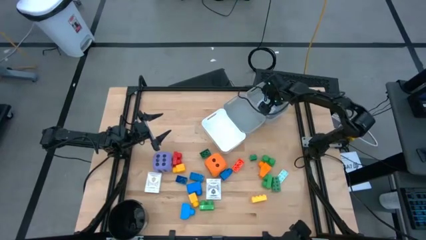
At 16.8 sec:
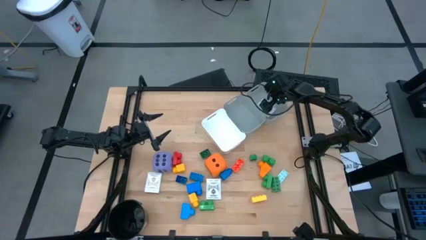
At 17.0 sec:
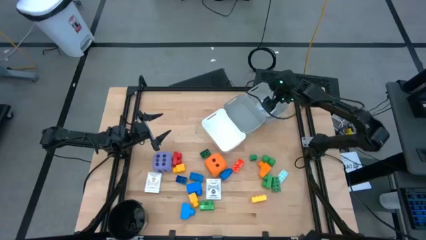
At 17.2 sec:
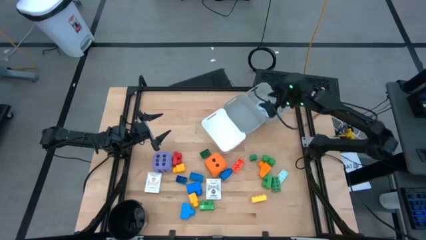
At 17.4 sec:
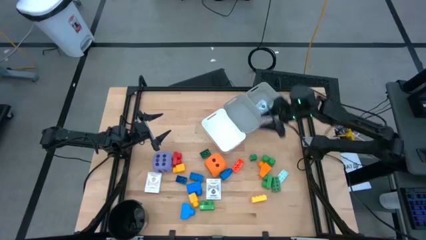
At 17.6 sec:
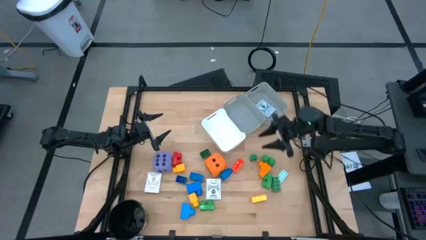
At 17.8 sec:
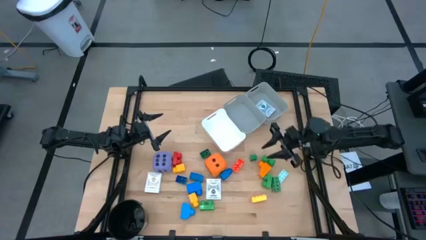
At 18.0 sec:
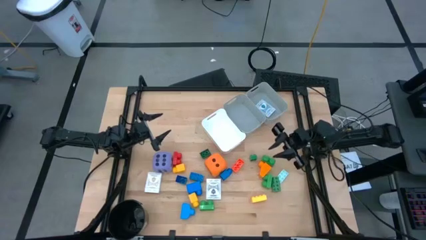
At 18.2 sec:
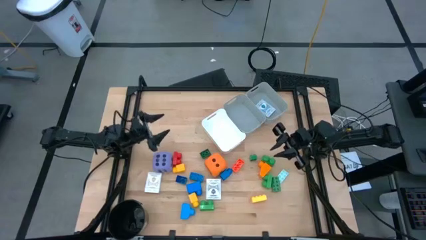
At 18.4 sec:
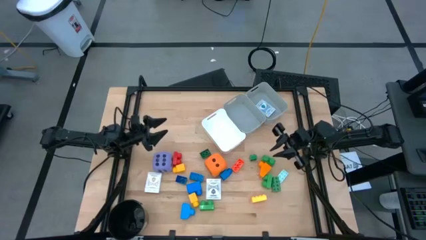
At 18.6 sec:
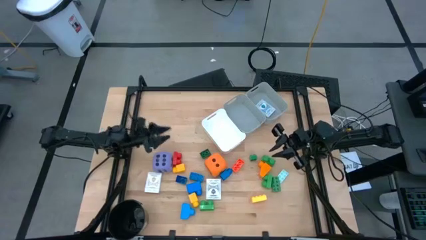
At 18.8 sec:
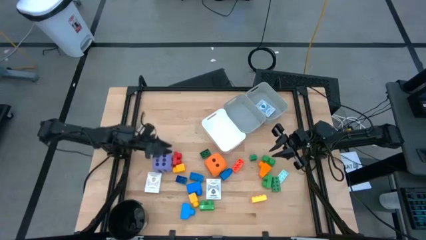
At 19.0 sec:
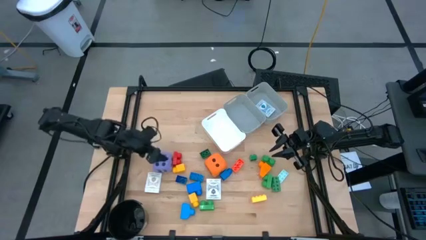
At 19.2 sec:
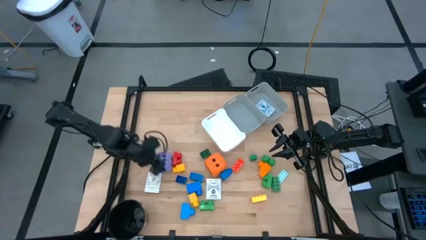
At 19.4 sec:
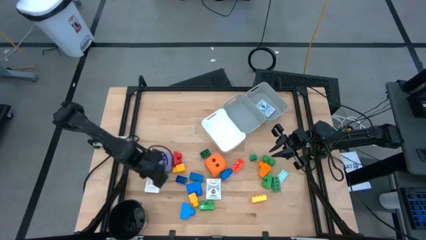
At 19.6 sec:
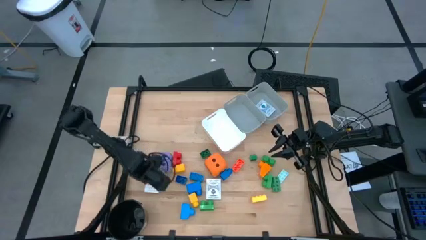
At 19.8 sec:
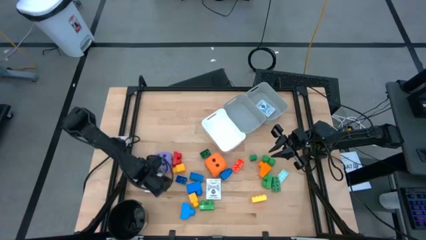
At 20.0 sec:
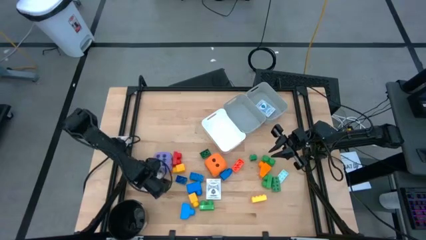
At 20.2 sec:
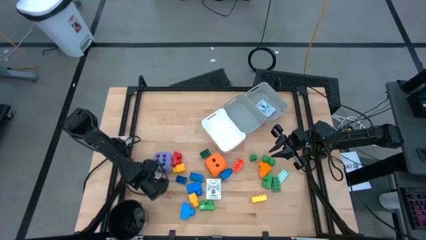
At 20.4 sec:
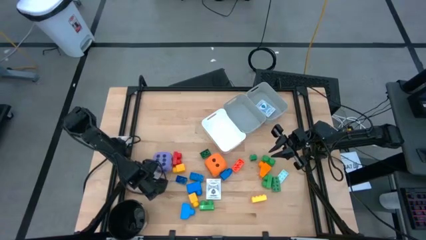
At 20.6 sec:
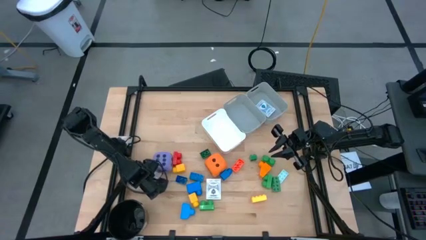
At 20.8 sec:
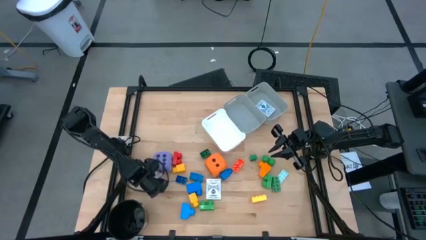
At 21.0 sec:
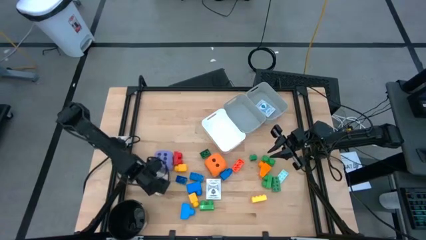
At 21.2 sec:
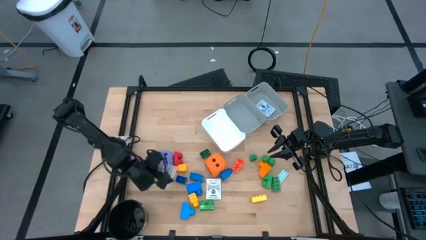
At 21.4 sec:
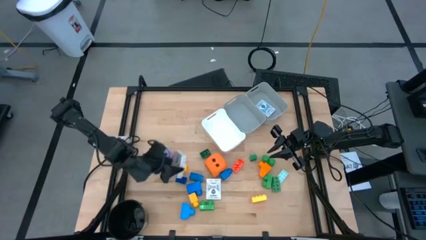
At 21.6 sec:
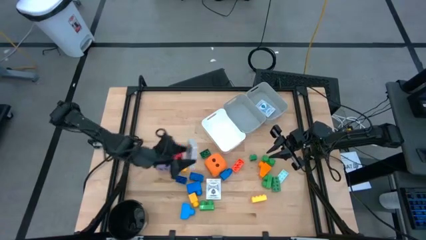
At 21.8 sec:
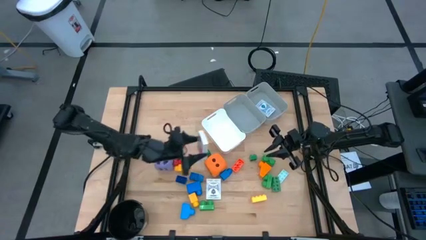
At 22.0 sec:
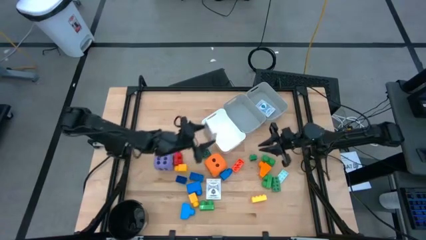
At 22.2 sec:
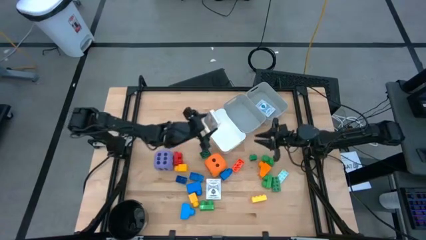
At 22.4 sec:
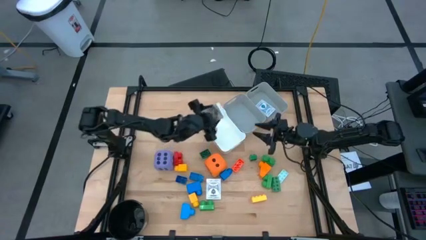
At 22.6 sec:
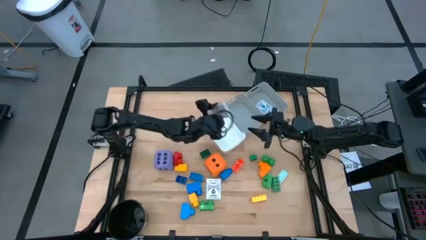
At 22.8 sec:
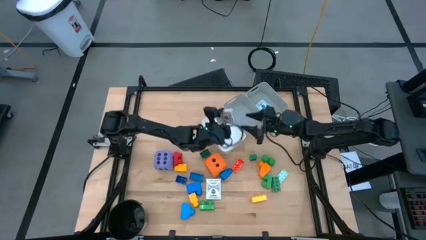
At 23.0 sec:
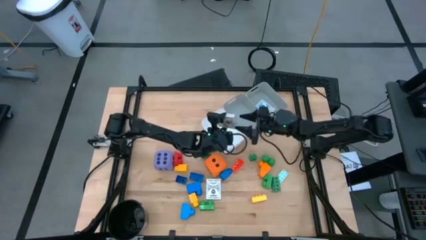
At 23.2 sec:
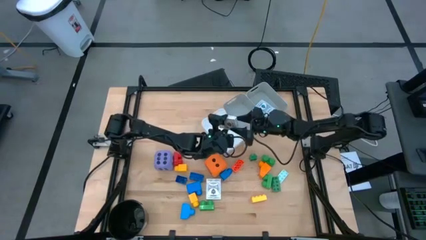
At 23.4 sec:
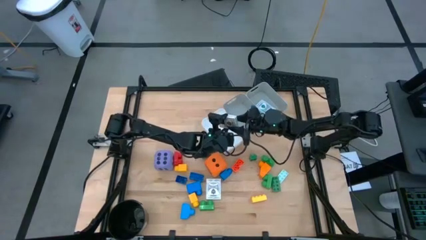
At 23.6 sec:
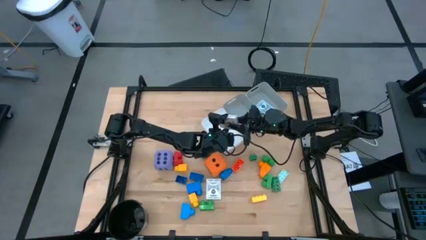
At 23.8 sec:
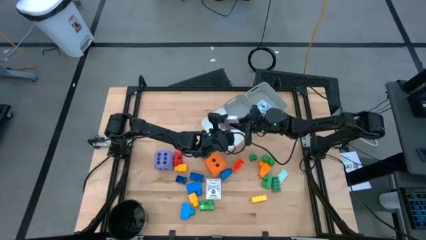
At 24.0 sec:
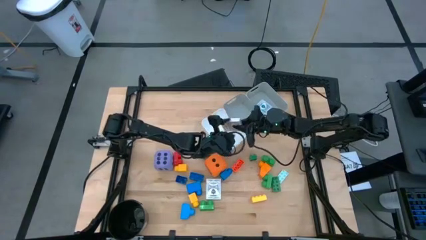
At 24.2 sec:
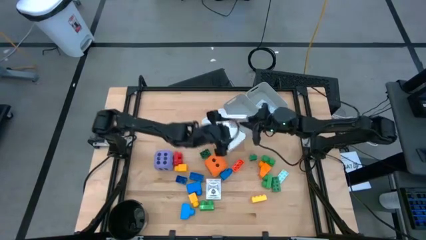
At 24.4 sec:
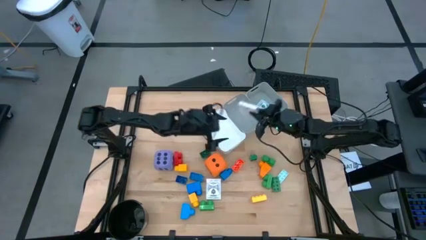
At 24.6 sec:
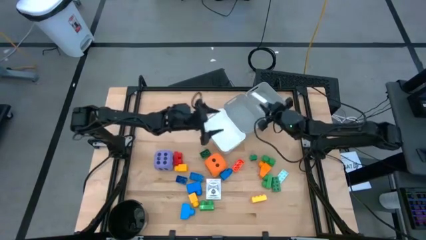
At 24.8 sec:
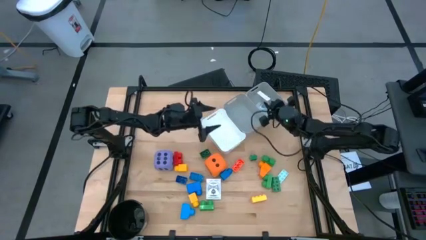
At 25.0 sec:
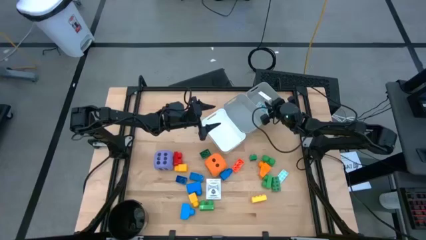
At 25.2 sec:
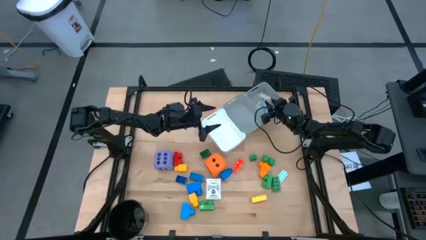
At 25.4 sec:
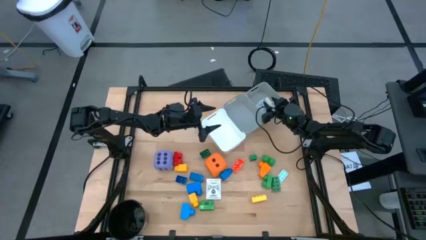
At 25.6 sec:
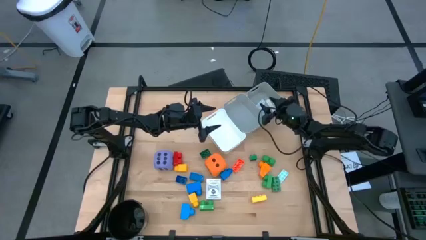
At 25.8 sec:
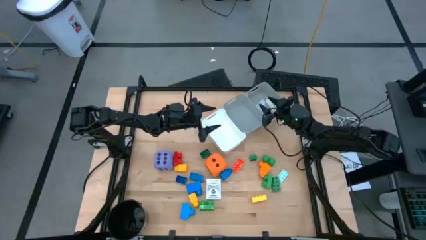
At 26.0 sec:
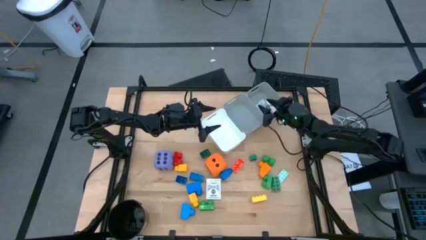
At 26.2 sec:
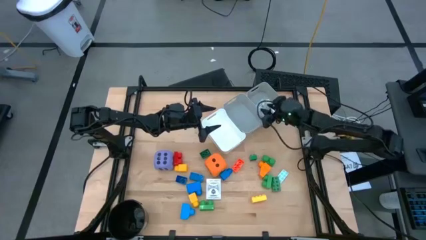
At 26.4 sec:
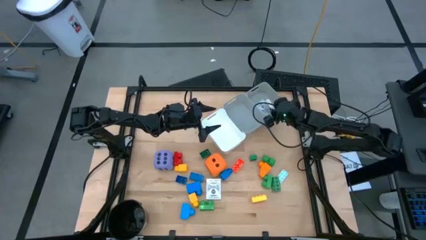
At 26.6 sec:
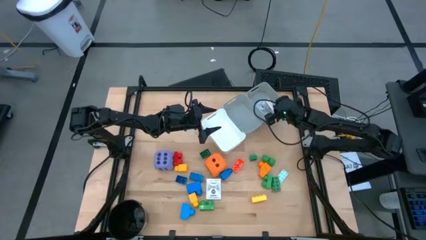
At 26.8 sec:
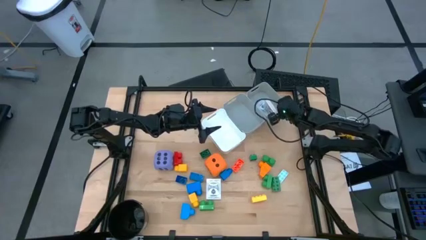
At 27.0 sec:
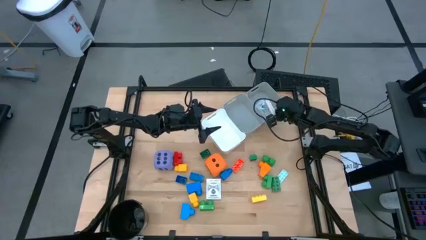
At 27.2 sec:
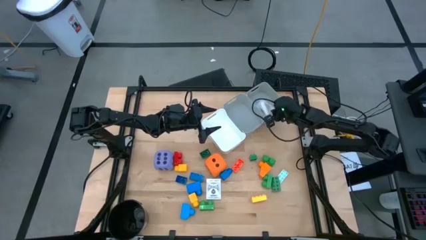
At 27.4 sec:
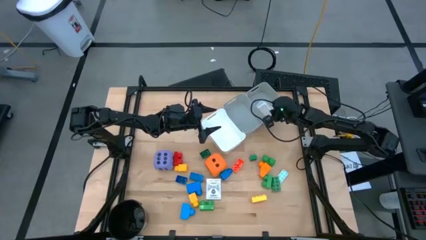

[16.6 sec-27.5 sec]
Task: Pick & Place Toys
Put the brown deck of cards into the right grey bin

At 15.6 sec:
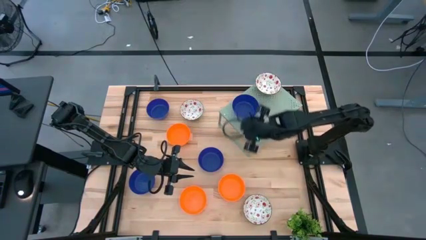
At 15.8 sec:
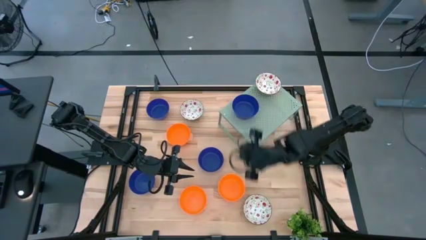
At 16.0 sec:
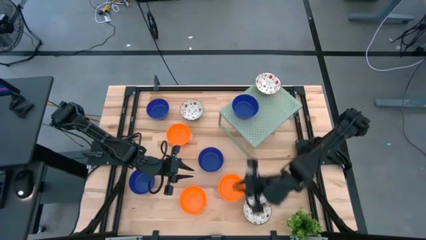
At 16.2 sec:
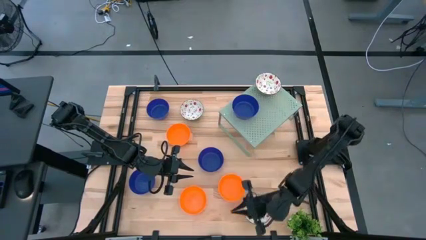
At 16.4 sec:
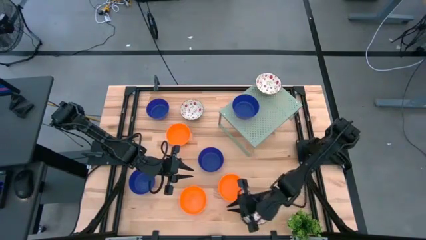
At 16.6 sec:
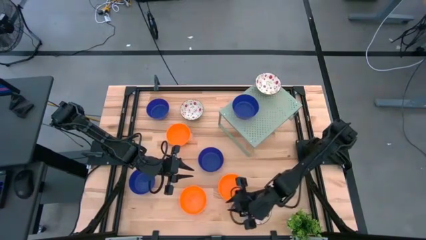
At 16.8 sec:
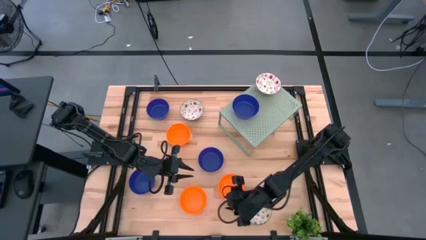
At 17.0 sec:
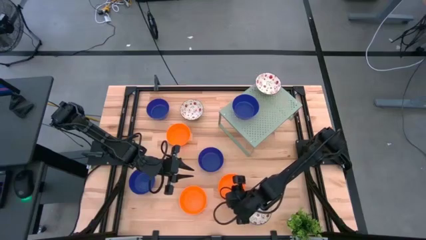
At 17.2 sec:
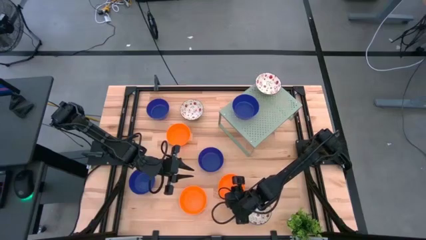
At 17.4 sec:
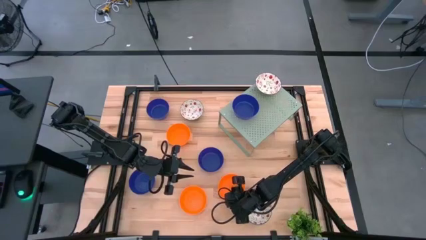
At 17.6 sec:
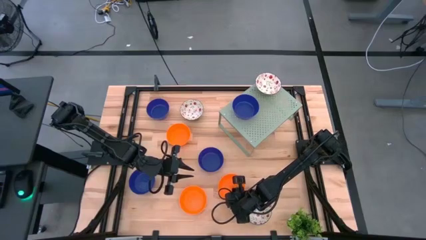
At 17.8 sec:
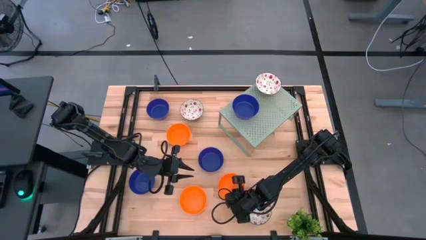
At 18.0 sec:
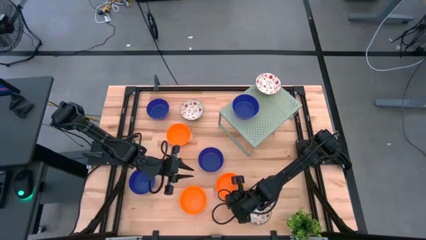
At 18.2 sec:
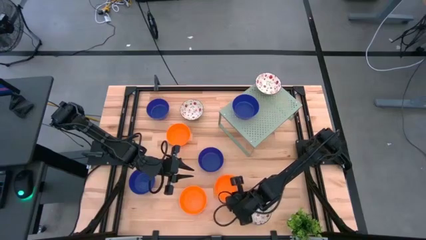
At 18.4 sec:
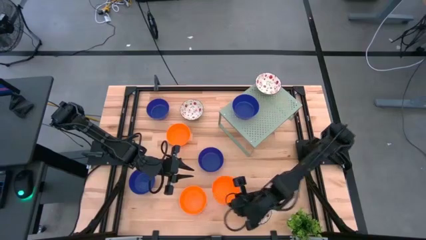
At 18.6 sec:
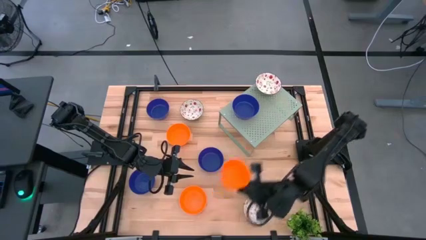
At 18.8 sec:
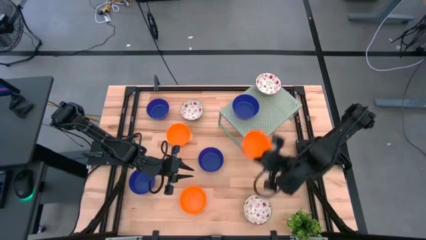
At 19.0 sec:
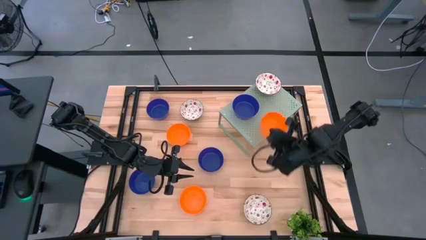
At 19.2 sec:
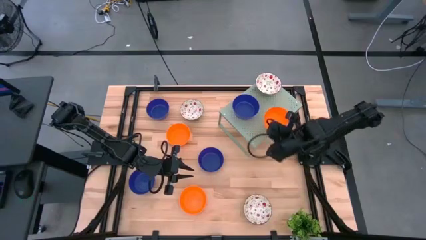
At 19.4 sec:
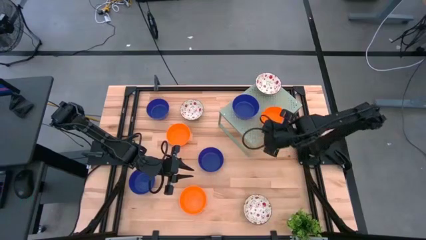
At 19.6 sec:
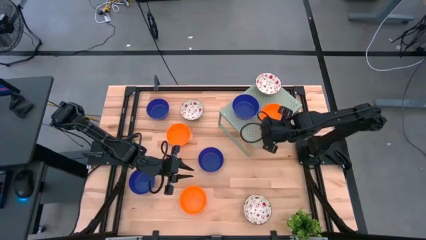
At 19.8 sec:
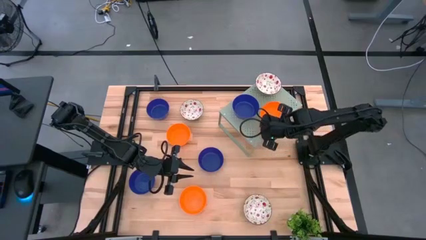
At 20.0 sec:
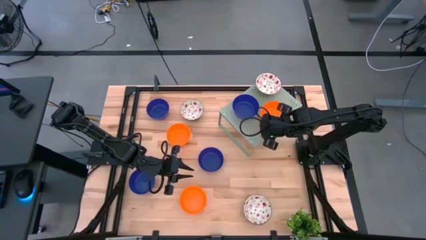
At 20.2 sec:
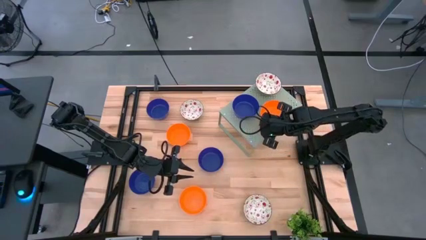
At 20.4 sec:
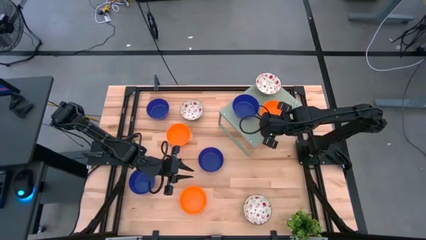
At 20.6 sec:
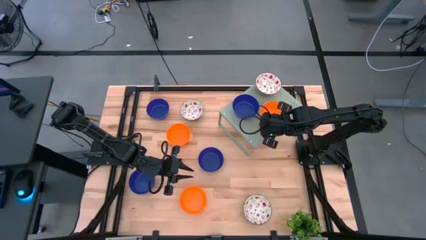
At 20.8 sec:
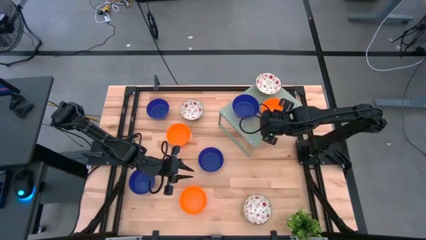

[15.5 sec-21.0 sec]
Task: Pick & Place Mini bowls
Put the orange bowl on the shelf
